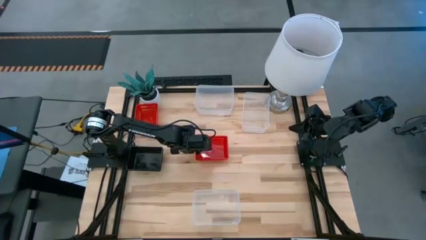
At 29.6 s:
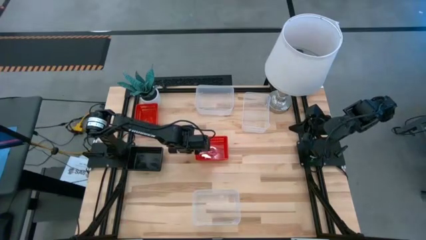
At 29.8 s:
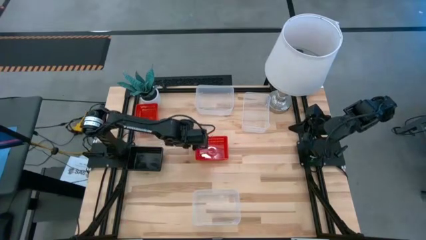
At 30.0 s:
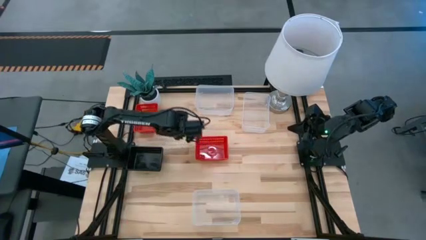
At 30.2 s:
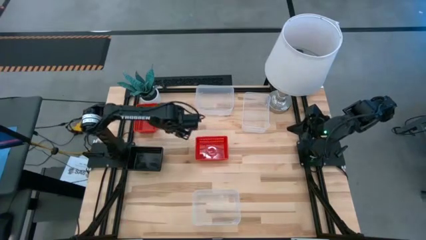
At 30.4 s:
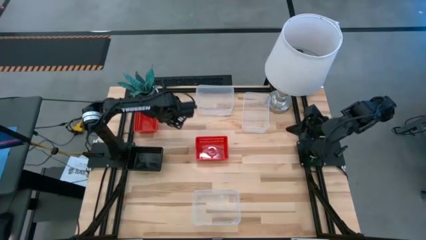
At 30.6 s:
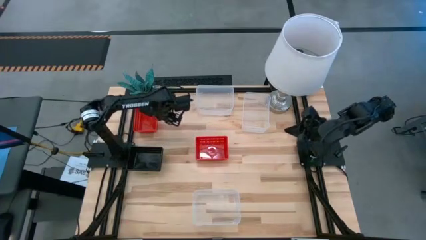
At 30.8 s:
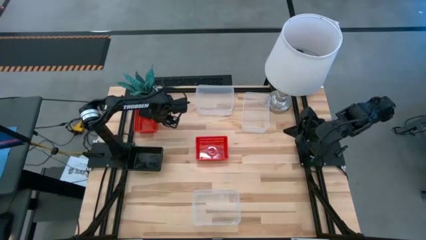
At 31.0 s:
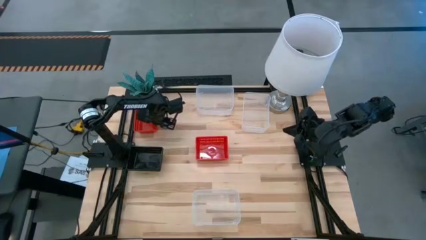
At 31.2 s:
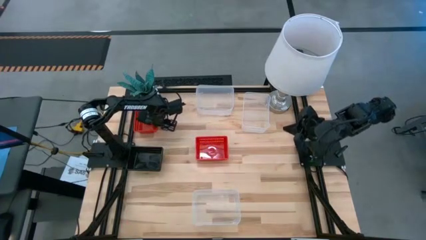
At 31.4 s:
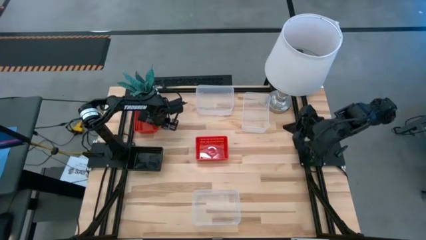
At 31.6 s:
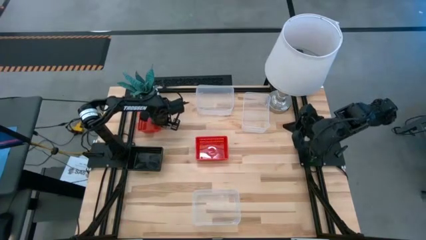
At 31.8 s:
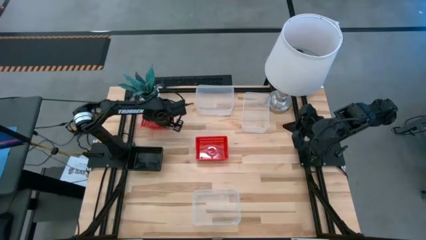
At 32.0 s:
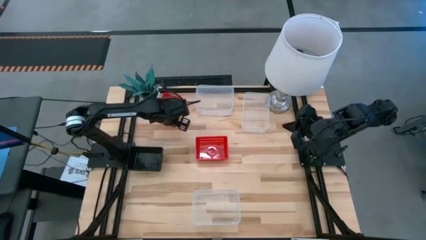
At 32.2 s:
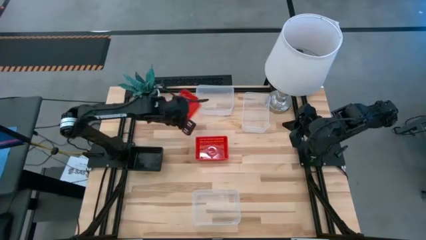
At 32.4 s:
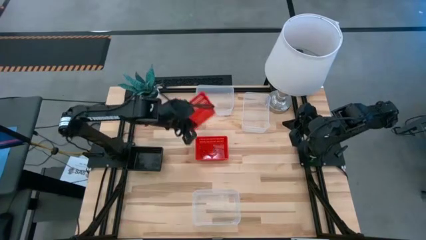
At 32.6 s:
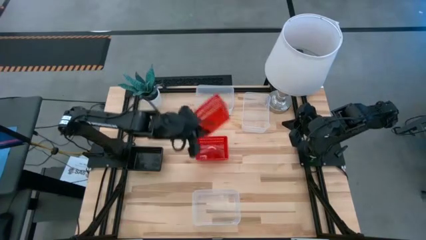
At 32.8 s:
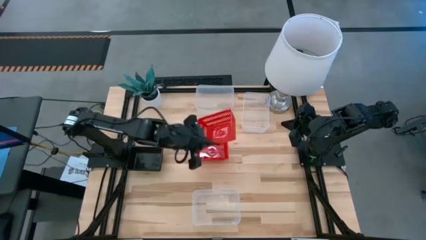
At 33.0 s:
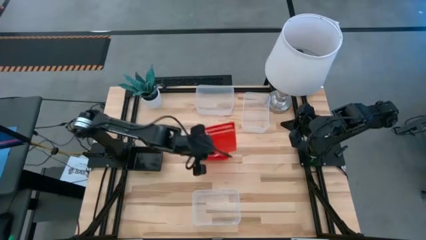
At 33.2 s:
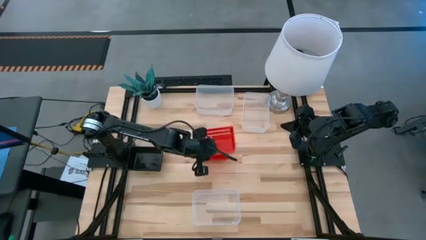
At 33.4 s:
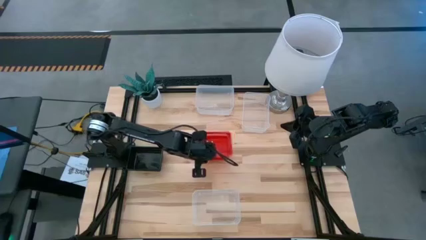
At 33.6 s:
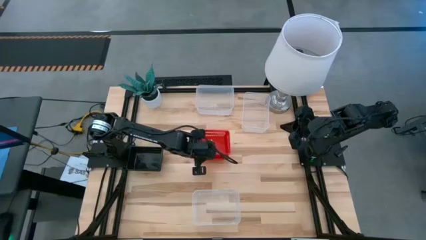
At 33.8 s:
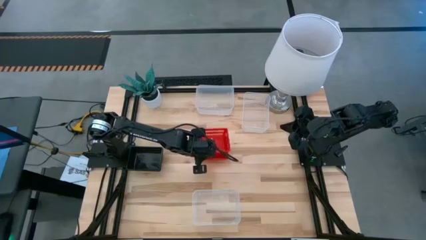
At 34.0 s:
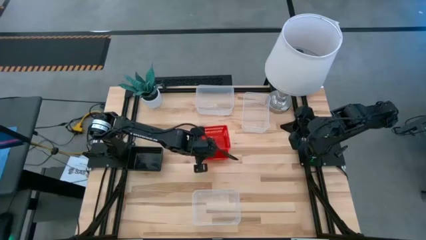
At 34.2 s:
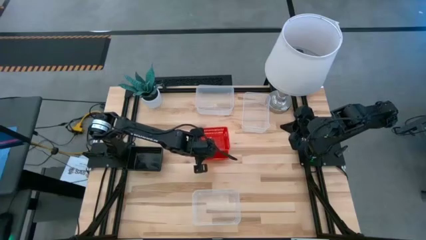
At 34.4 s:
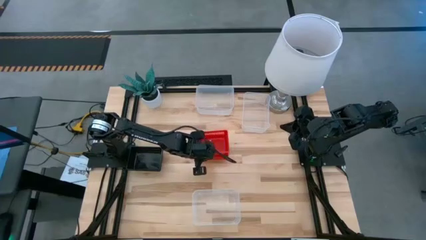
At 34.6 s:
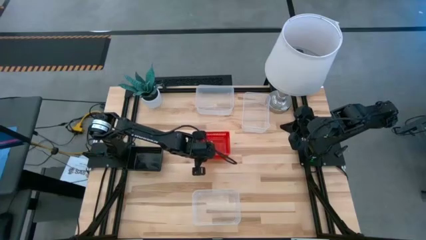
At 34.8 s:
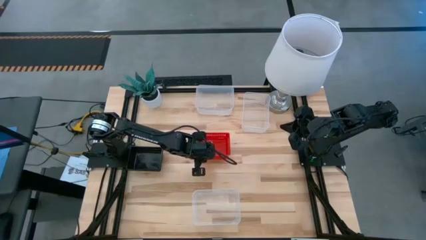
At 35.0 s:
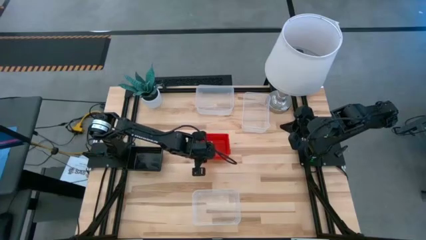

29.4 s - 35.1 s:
Stack the left red bin on the right red bin

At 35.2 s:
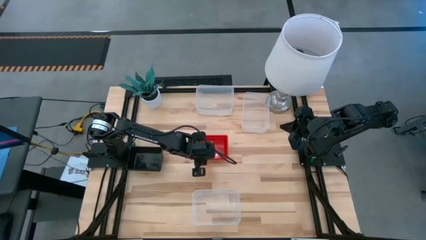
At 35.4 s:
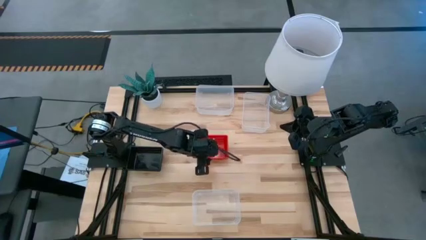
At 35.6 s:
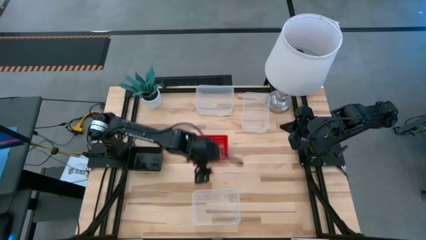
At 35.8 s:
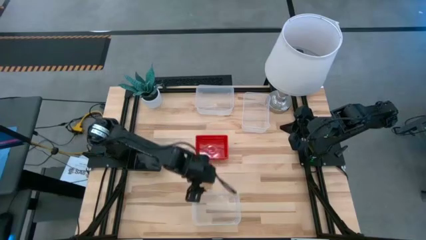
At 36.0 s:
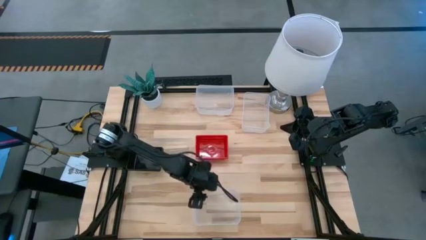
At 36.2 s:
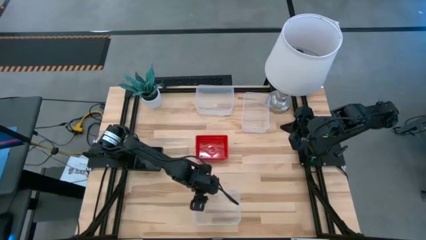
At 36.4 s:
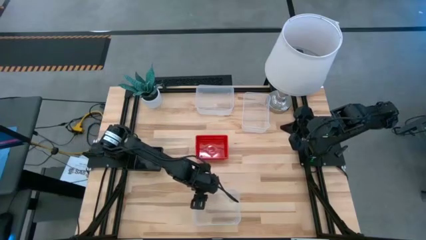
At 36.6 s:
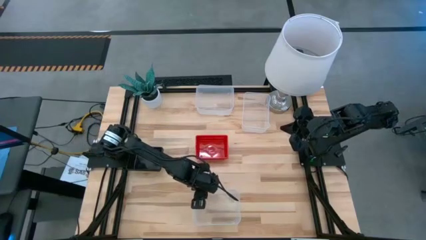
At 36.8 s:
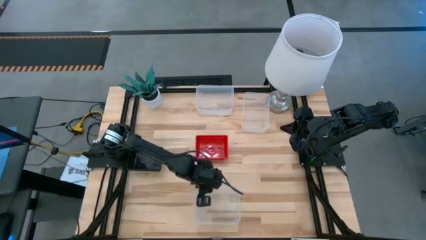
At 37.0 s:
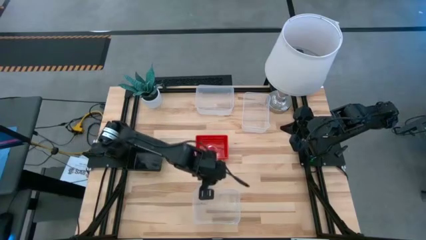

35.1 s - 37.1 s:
Stack the bottom transparent bin on the top left transparent bin

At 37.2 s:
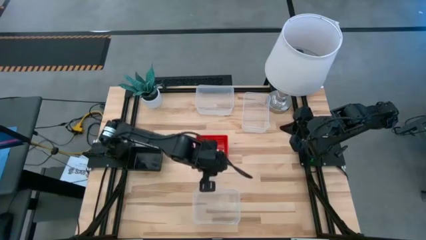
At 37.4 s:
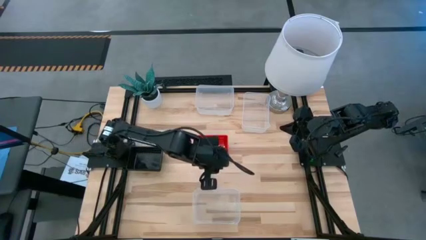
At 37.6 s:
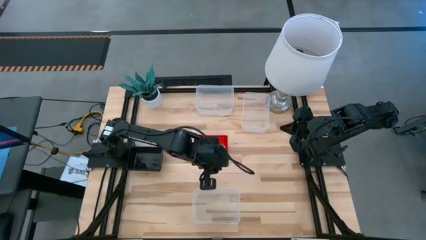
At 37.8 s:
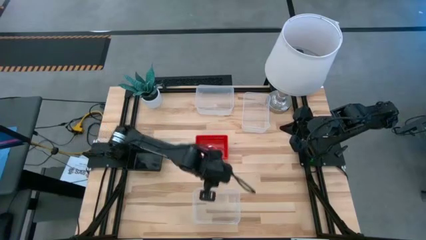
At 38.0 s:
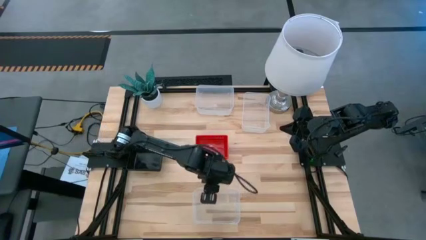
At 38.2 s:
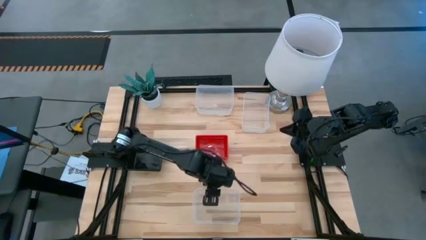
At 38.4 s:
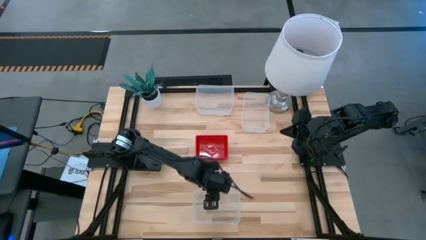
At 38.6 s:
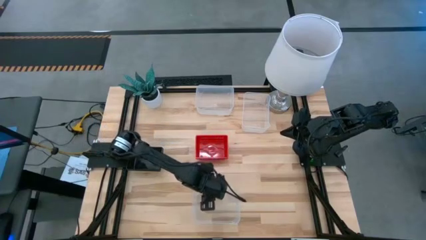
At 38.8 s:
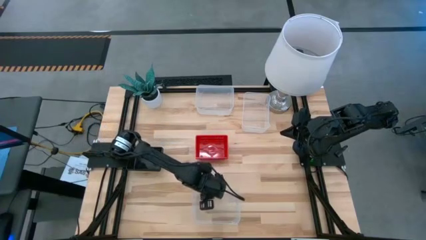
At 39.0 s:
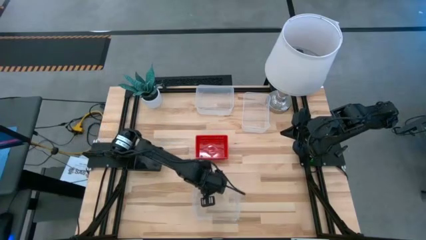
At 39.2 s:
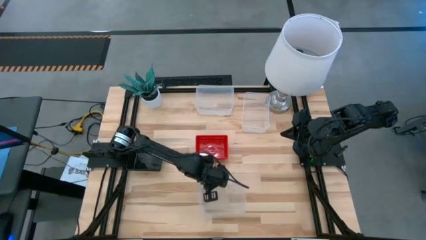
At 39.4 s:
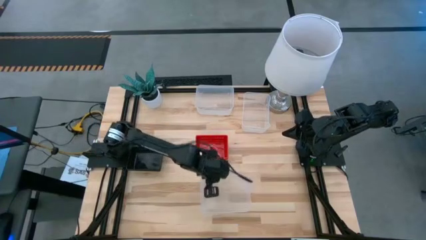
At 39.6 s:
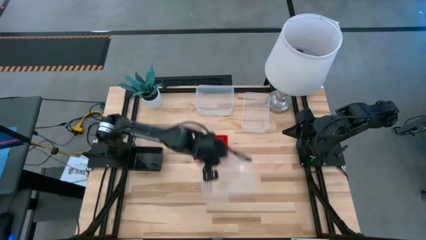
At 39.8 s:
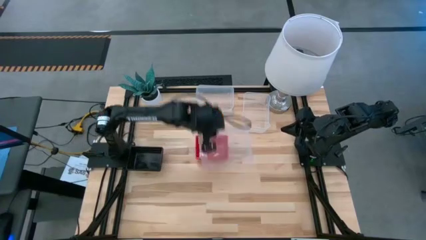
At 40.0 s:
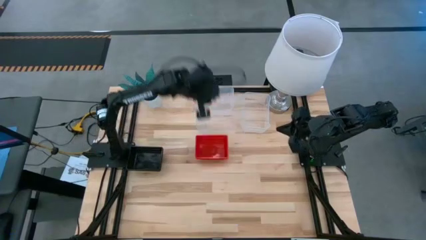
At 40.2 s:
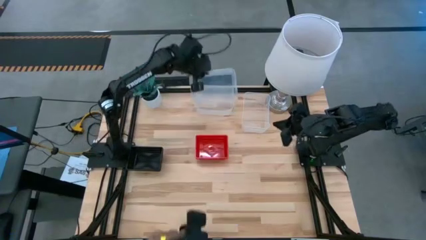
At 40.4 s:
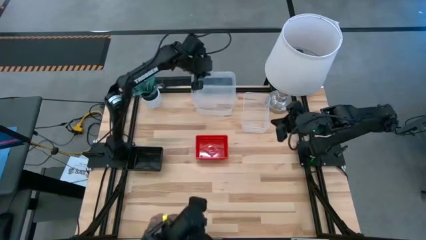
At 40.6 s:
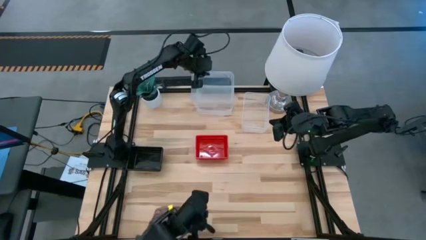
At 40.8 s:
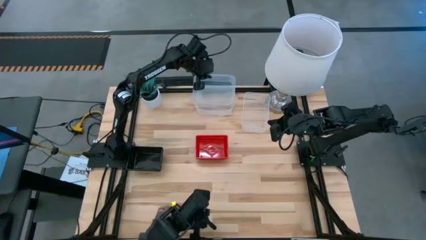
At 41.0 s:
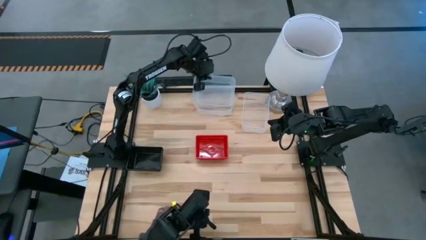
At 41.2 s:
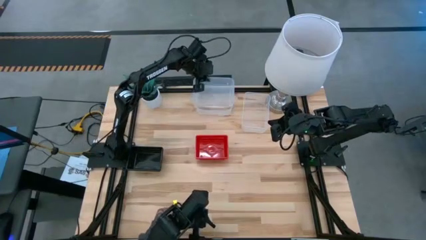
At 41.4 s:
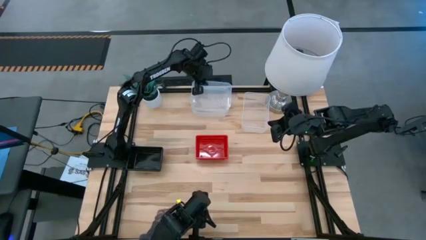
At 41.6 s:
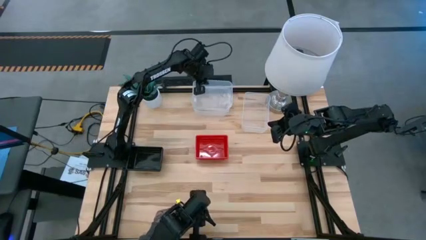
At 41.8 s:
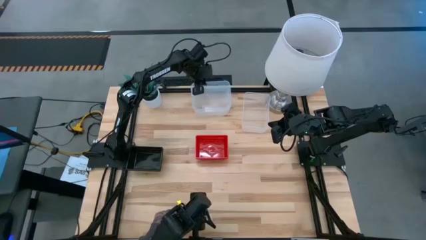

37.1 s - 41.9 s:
Stack the bottom transparent bin on the top left transparent bin
